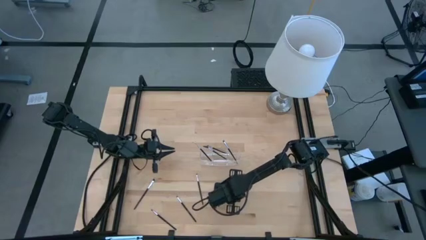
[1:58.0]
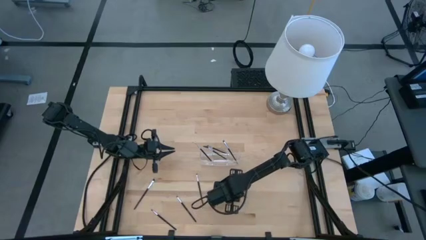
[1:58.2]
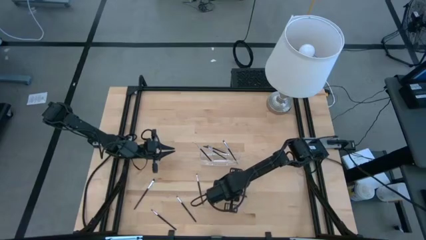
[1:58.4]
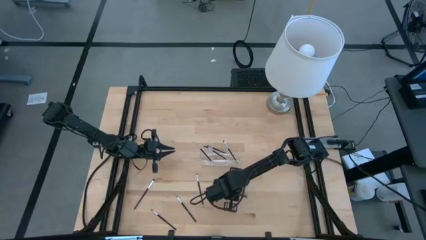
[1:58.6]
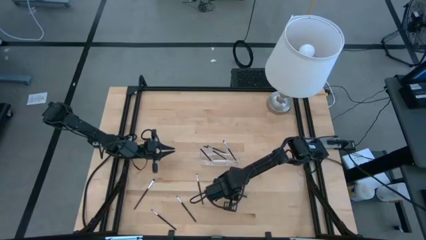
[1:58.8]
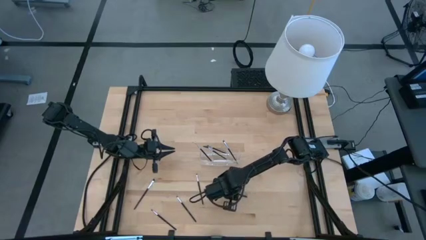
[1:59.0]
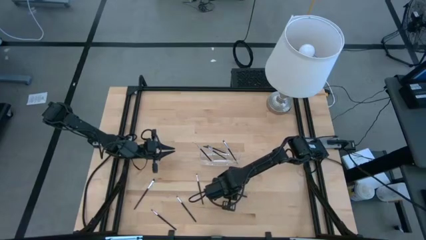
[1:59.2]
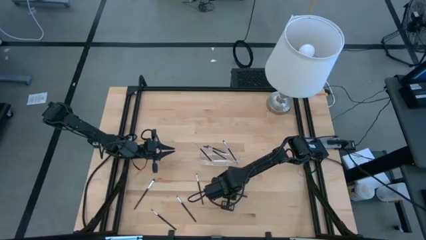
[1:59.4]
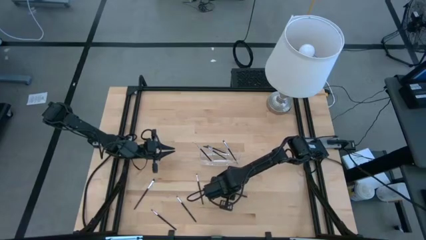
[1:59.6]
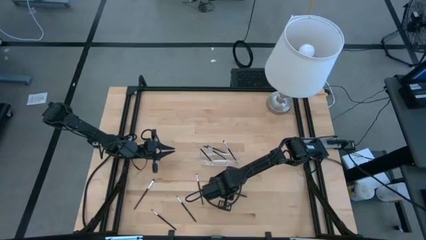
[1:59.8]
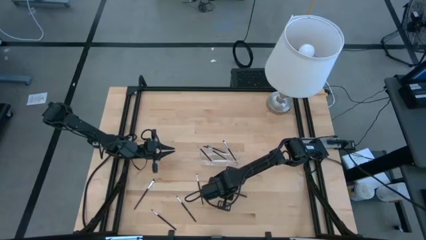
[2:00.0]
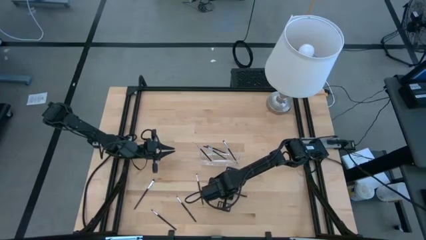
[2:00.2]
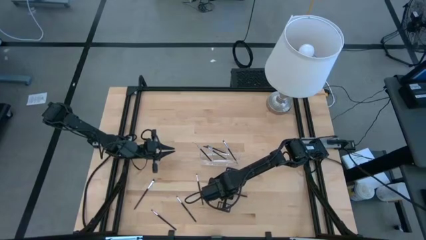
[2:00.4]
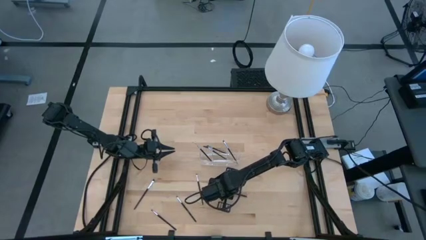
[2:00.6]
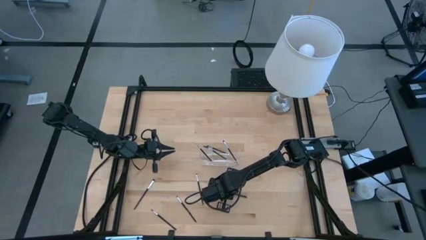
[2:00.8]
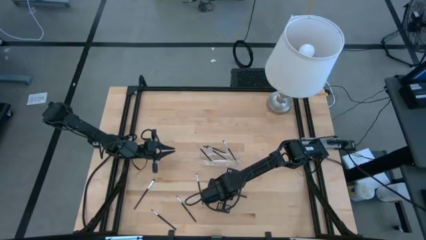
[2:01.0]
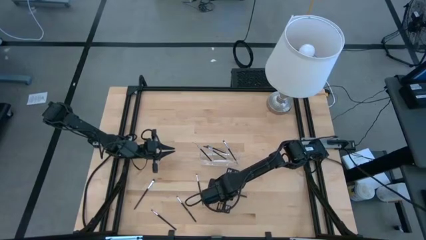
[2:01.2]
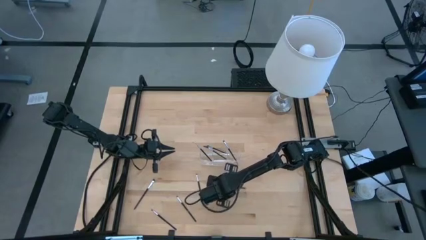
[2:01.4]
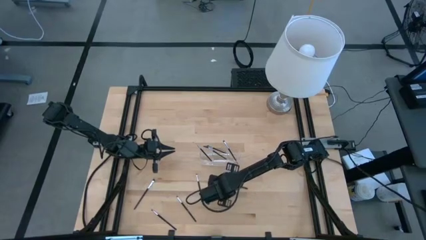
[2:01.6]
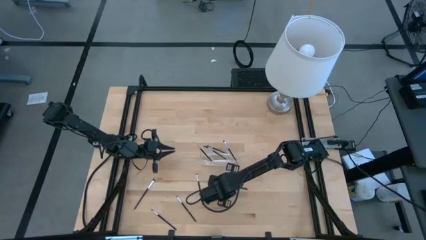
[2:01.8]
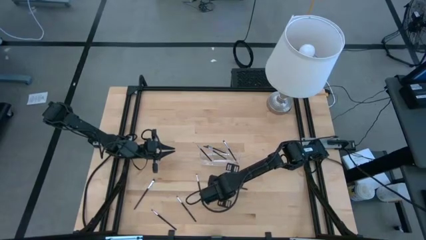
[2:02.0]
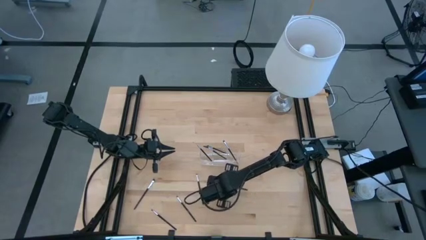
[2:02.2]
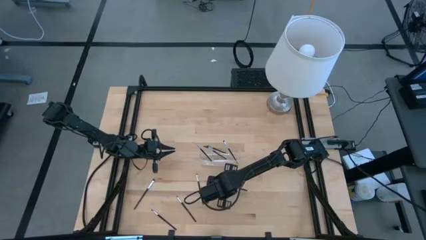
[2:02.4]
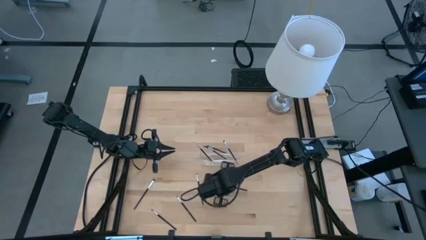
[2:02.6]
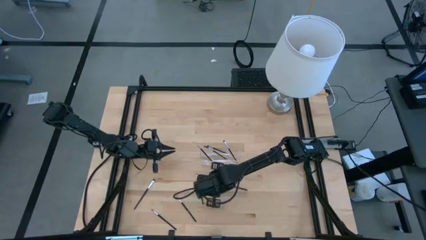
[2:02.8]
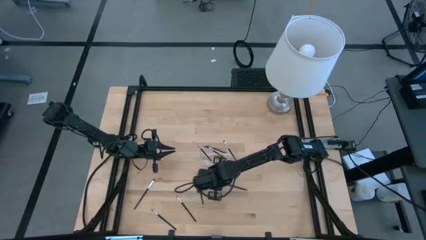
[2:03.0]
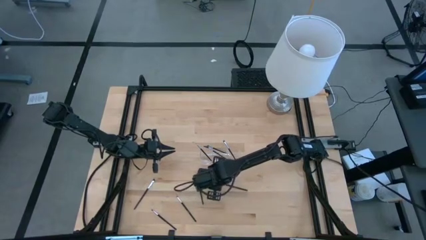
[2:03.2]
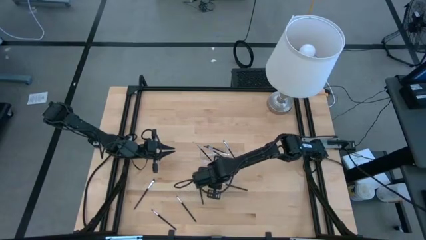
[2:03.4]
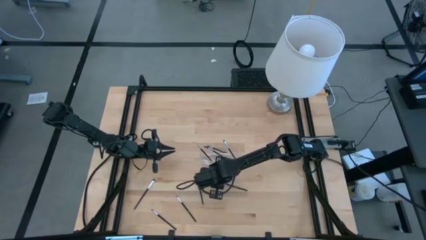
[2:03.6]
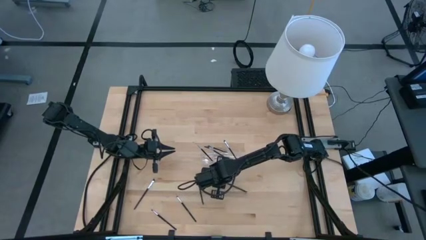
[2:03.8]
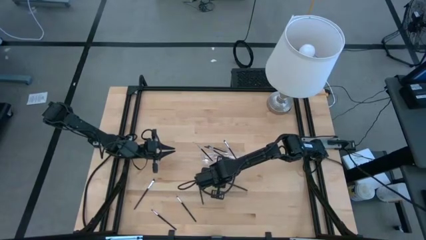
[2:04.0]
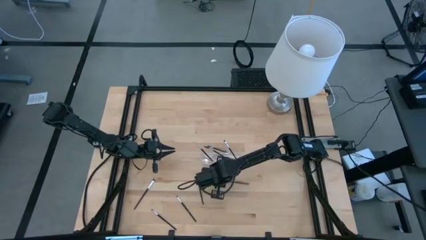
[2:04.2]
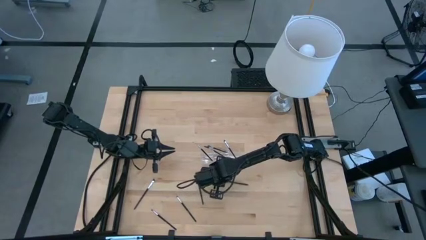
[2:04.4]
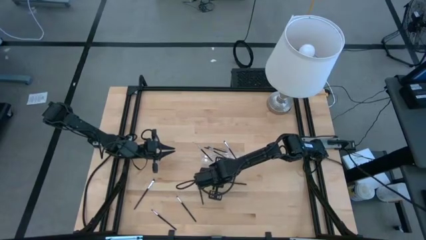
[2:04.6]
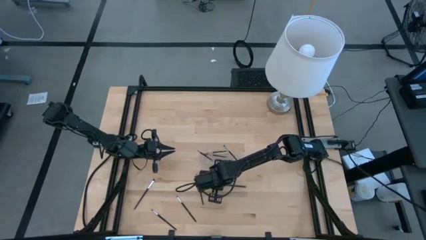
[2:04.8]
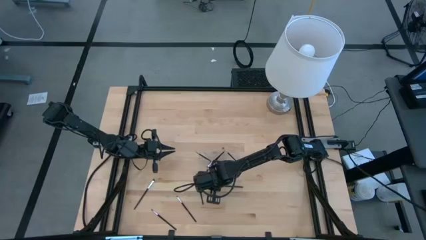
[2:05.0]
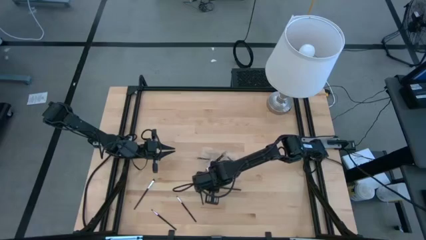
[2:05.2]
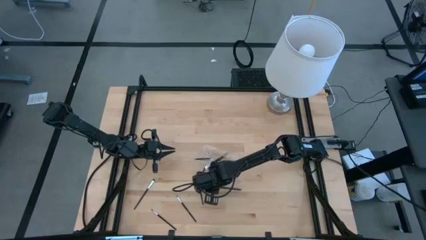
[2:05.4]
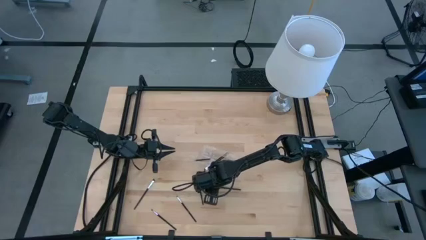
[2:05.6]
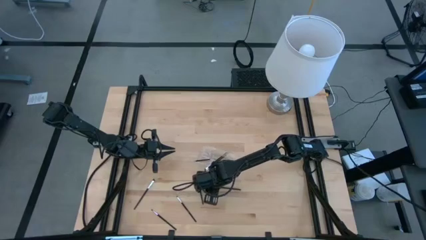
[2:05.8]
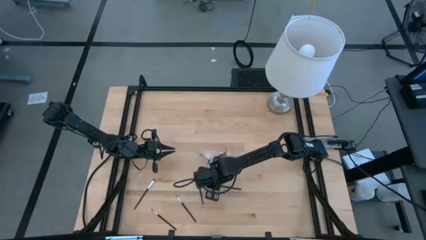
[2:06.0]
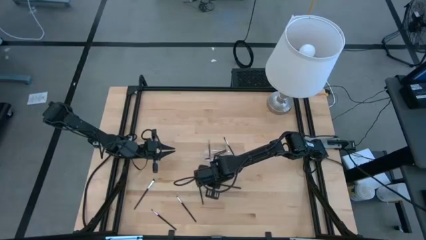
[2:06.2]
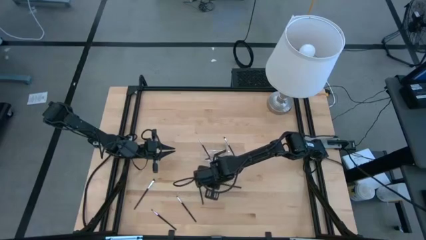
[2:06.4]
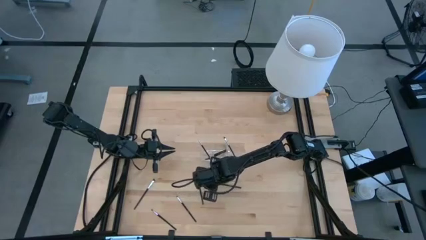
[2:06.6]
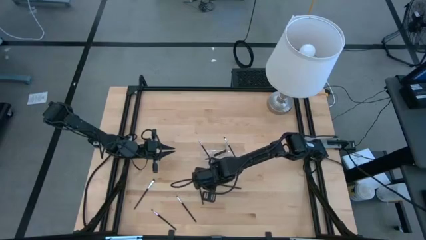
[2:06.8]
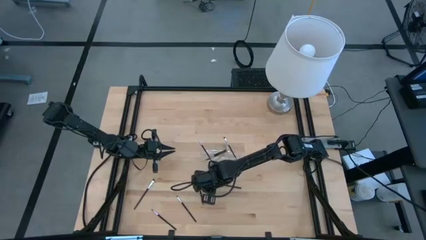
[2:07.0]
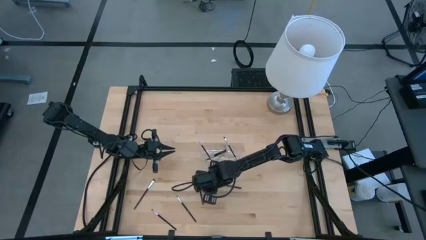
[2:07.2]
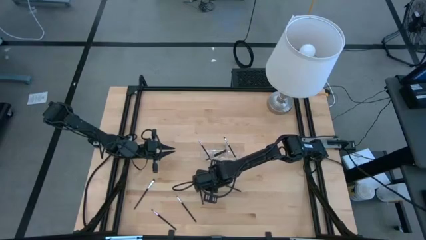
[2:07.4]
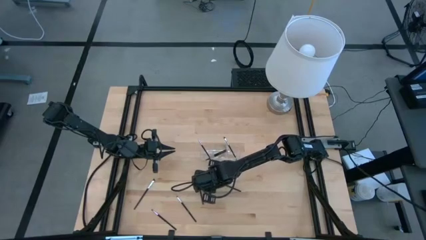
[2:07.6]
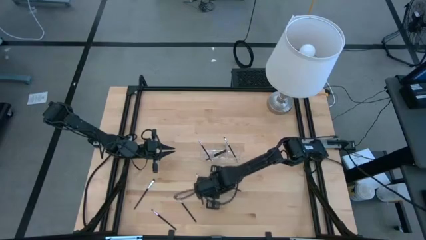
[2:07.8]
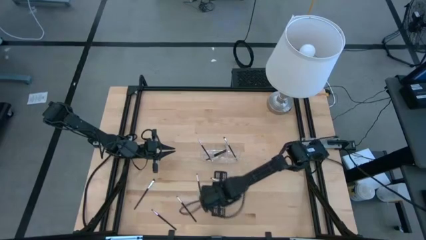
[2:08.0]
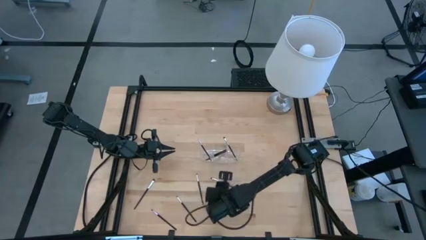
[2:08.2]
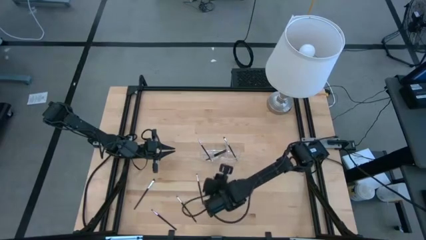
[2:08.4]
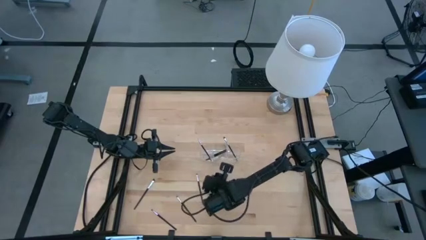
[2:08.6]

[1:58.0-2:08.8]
Task: Pick & Place Makeup Supplies
Put the makeup brush into the transparent organizer

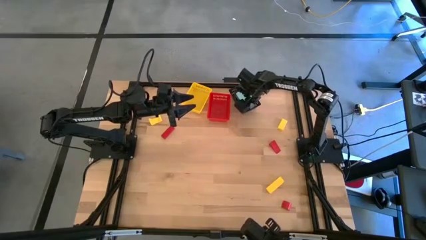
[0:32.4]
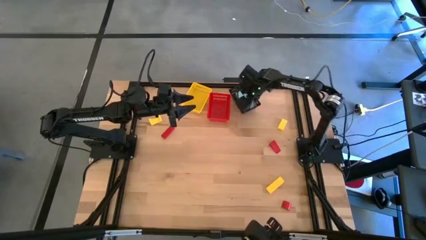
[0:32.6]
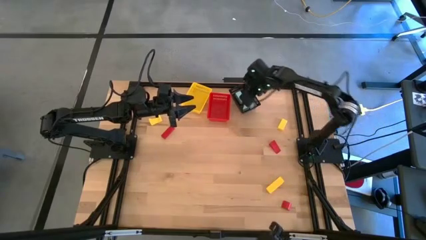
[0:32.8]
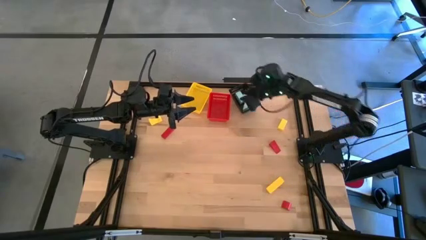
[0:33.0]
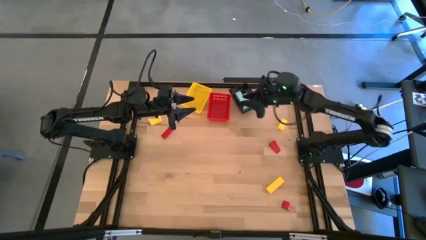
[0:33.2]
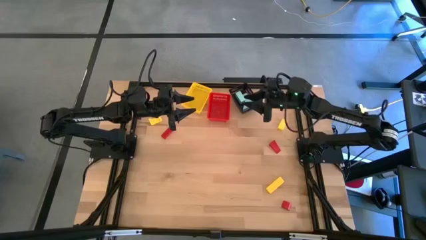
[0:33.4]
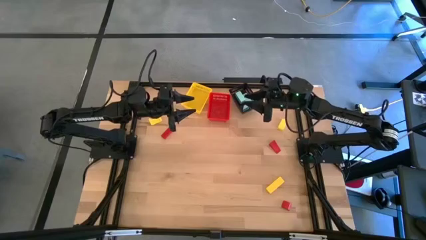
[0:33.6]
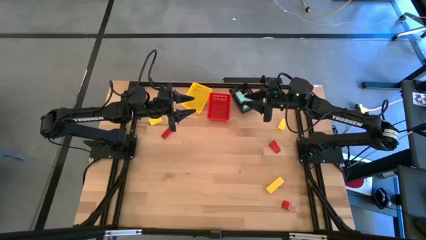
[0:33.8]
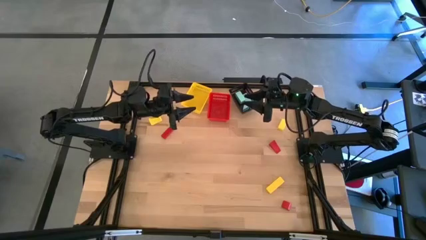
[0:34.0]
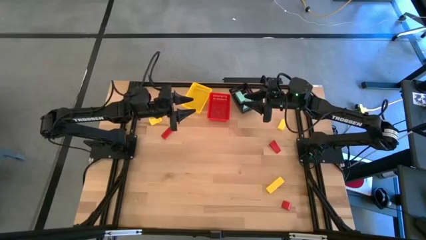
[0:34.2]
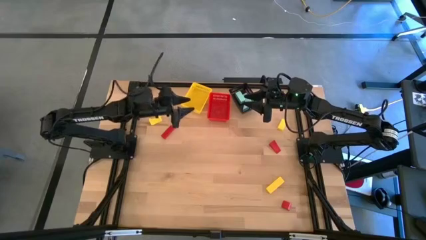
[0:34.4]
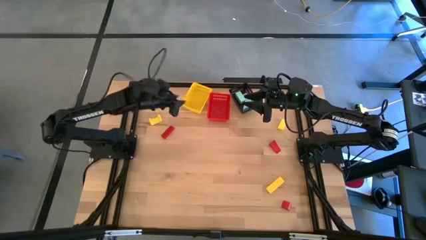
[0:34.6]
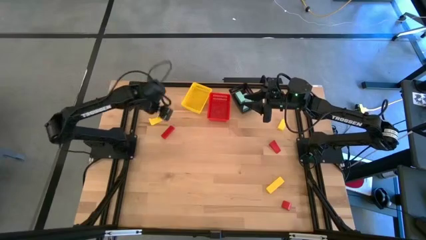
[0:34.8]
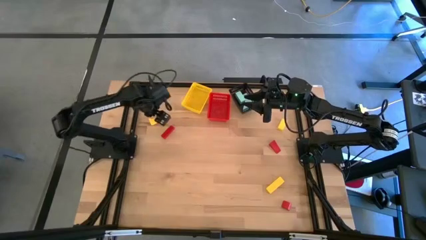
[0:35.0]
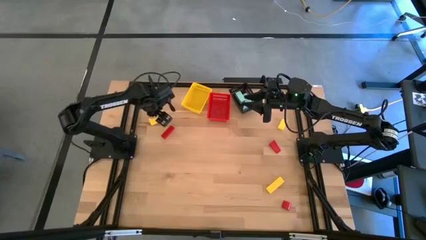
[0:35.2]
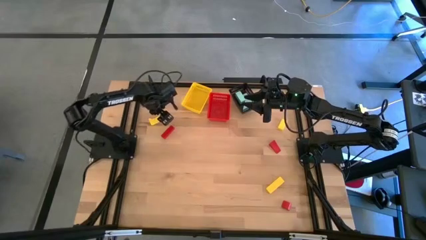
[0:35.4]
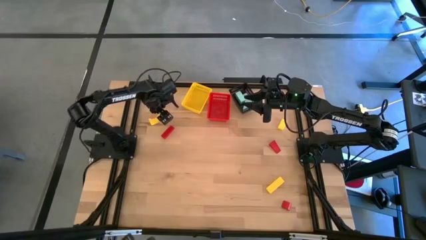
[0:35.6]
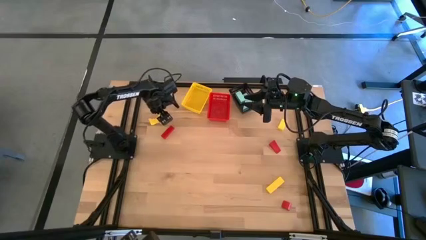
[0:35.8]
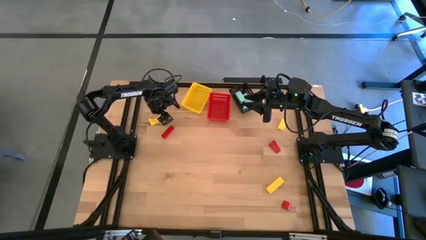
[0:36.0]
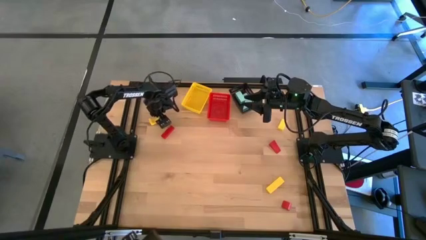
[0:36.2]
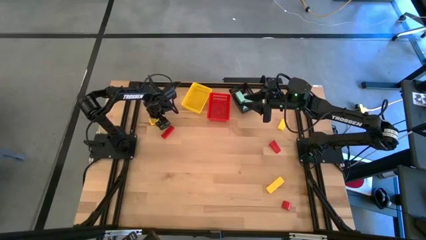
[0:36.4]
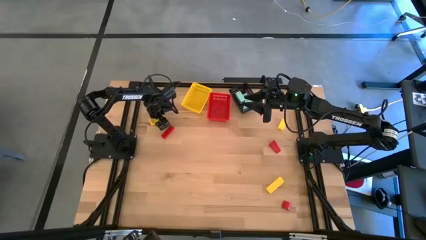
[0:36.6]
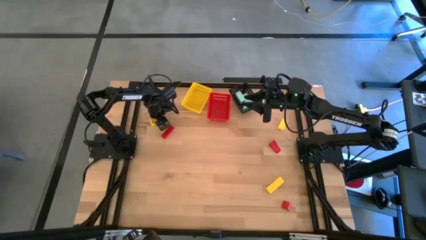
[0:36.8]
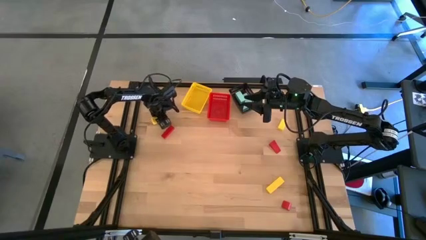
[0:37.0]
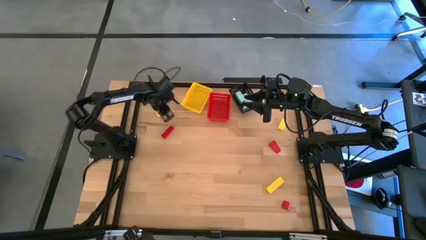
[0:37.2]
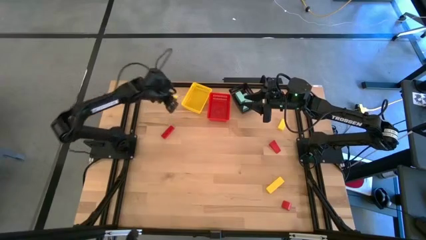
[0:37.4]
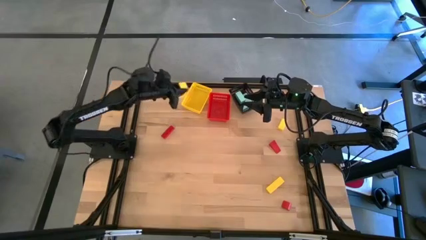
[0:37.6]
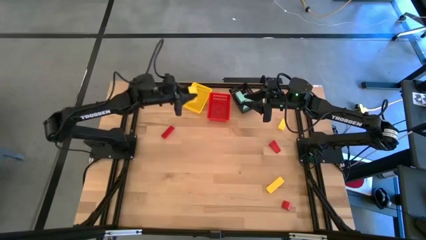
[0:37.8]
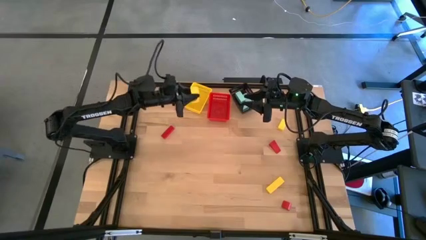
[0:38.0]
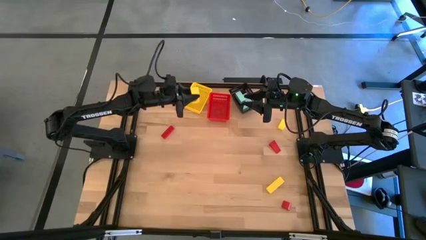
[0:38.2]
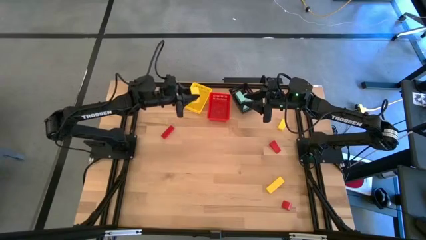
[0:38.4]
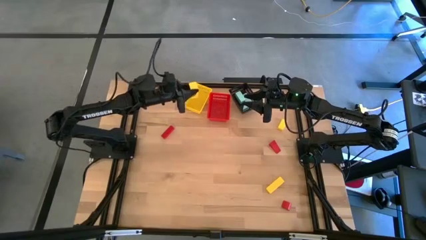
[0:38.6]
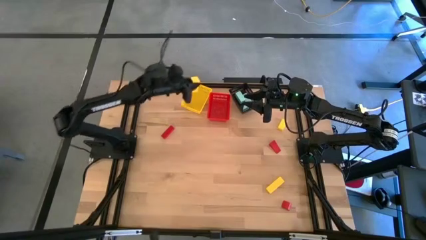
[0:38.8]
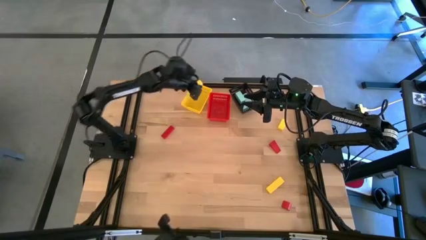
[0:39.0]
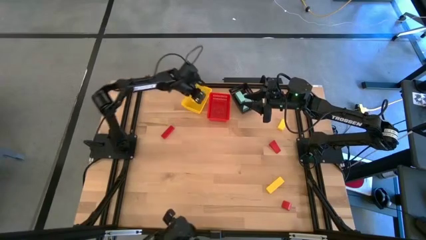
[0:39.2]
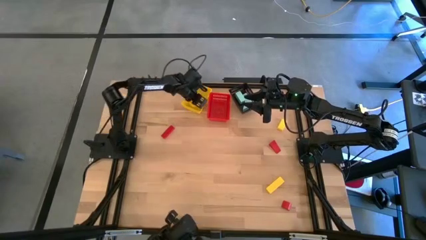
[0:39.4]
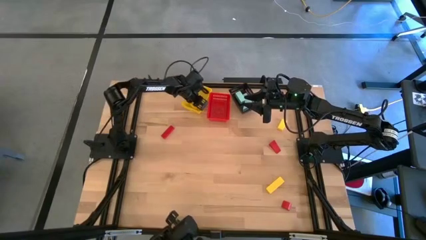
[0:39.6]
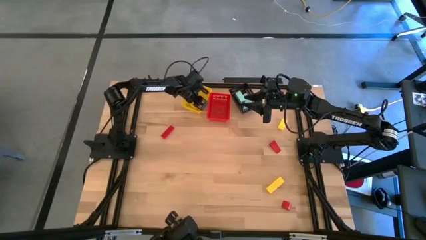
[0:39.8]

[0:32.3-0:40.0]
Task: Sort & place blocks by color
Put the top left yellow block into the yellow bin
